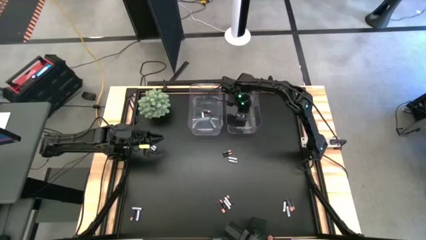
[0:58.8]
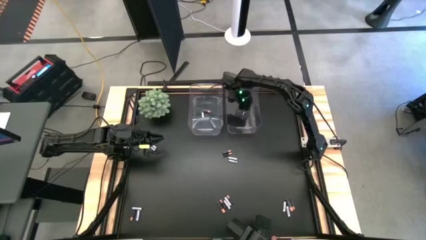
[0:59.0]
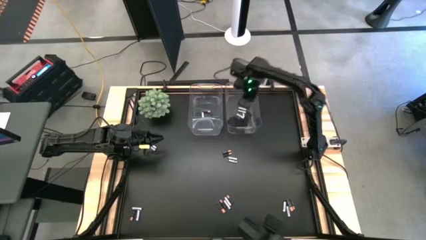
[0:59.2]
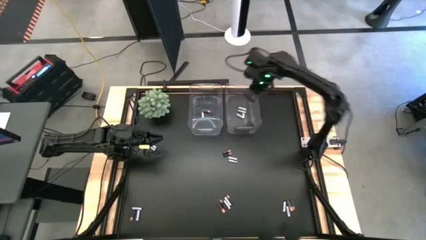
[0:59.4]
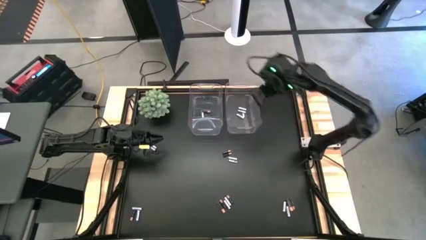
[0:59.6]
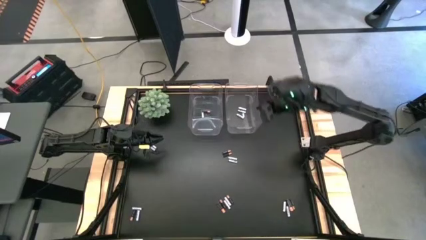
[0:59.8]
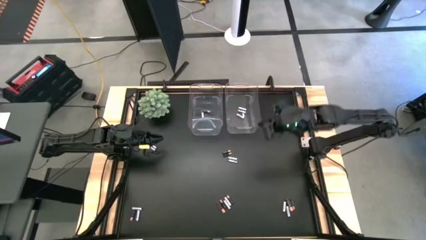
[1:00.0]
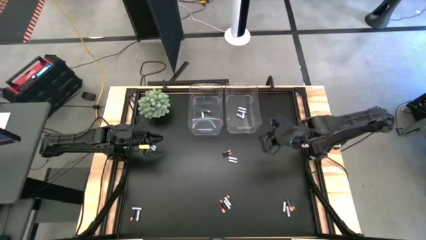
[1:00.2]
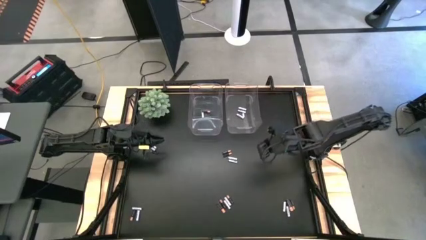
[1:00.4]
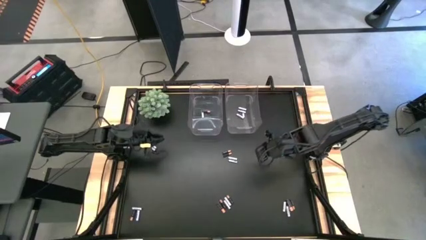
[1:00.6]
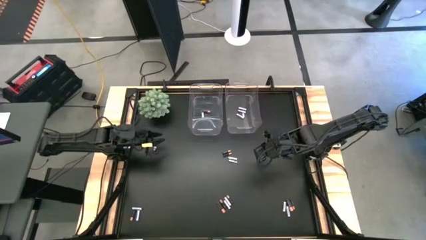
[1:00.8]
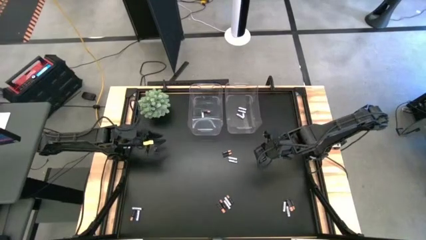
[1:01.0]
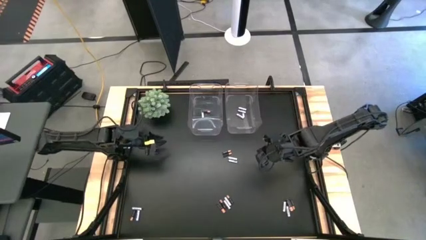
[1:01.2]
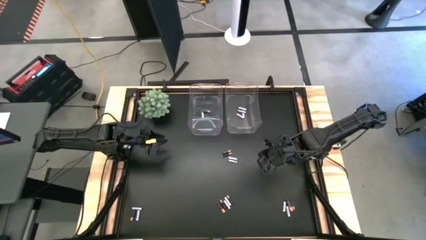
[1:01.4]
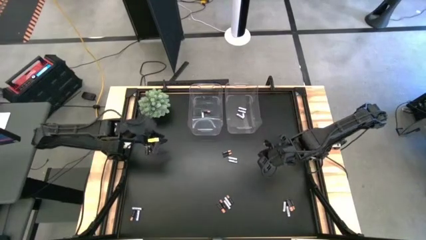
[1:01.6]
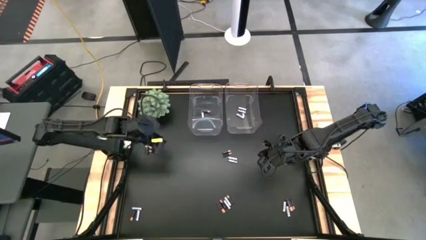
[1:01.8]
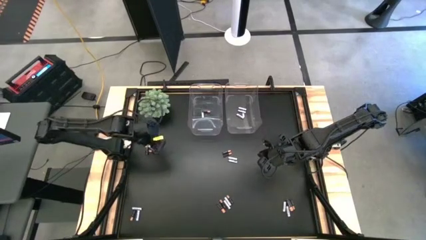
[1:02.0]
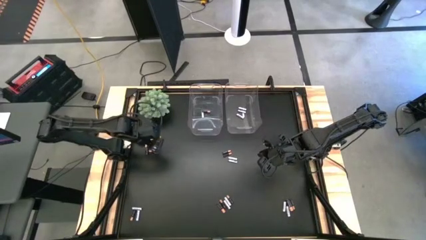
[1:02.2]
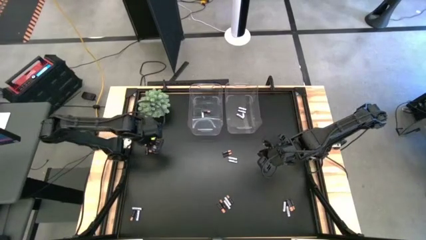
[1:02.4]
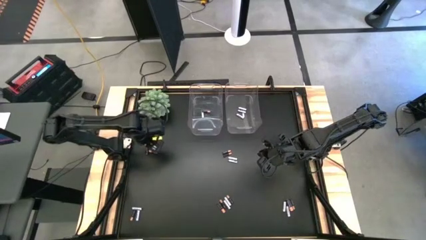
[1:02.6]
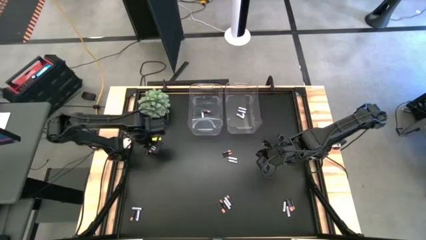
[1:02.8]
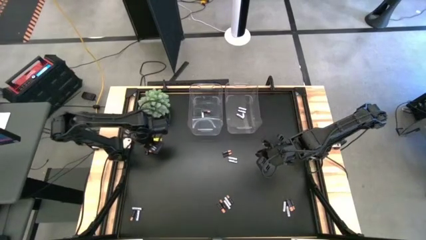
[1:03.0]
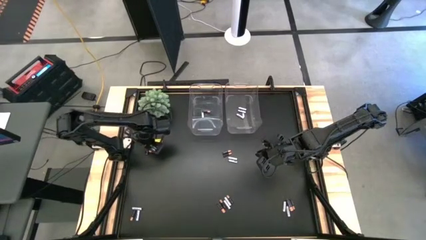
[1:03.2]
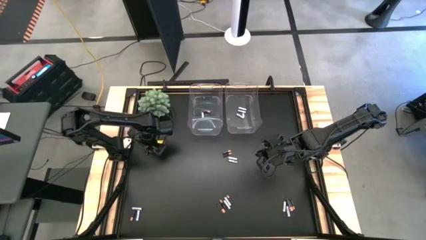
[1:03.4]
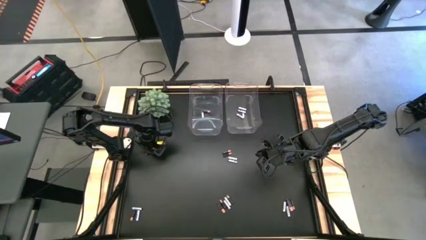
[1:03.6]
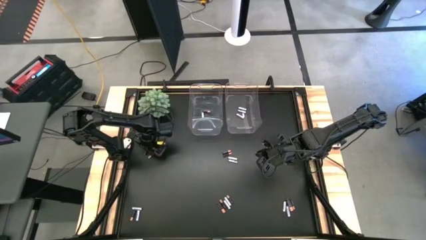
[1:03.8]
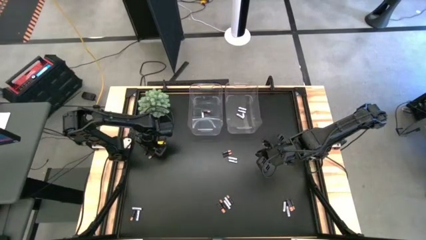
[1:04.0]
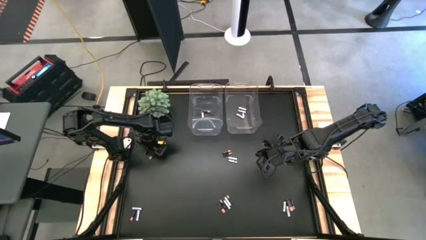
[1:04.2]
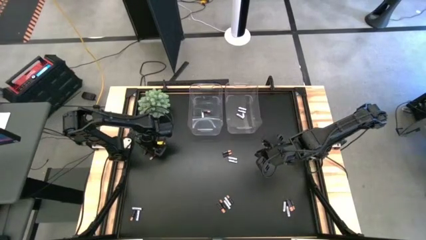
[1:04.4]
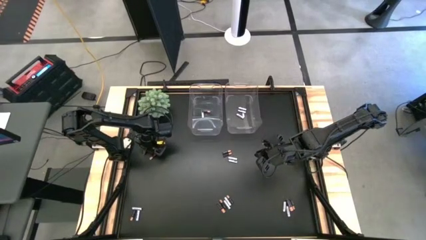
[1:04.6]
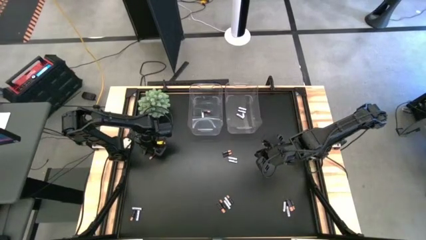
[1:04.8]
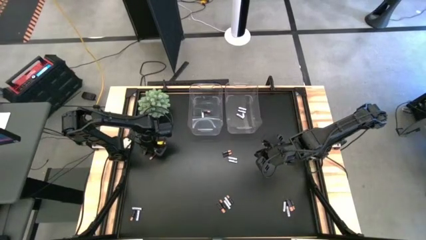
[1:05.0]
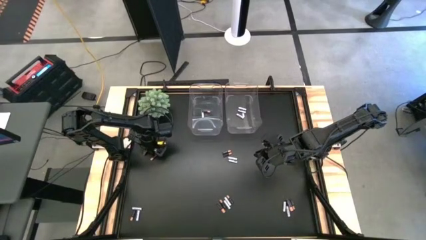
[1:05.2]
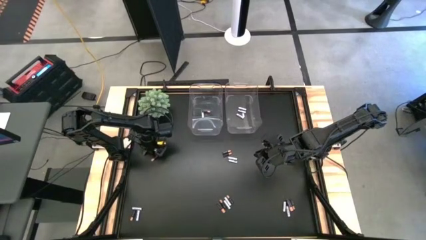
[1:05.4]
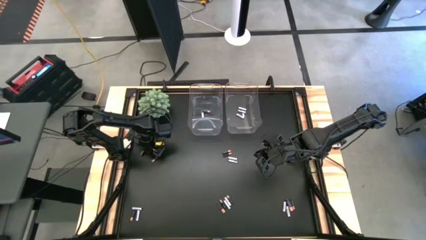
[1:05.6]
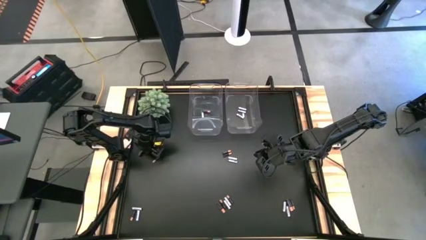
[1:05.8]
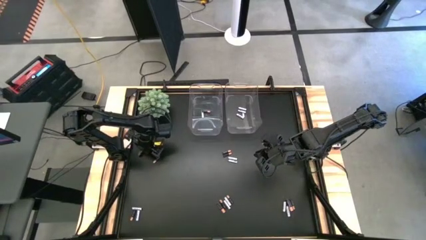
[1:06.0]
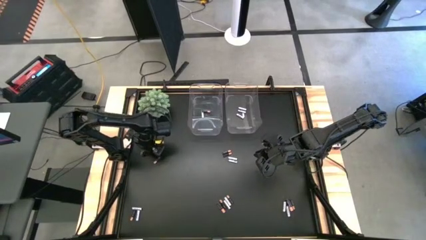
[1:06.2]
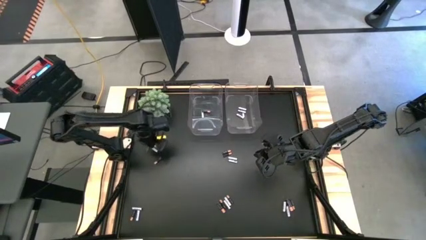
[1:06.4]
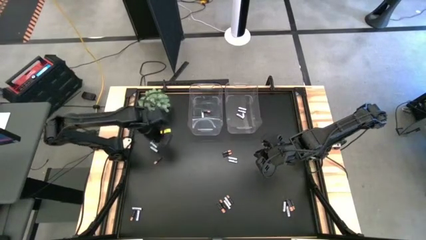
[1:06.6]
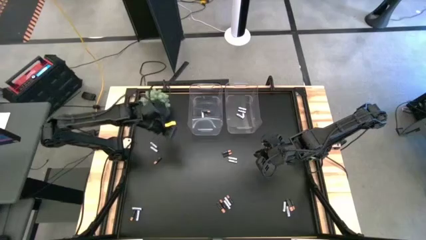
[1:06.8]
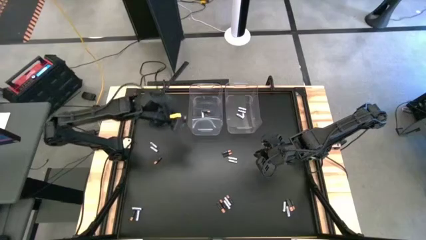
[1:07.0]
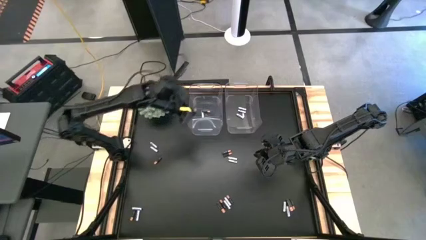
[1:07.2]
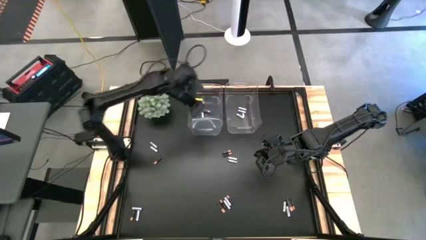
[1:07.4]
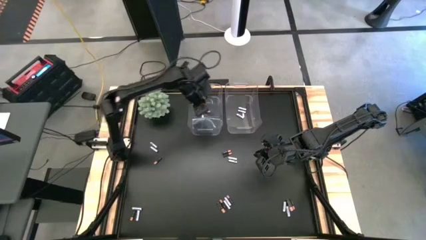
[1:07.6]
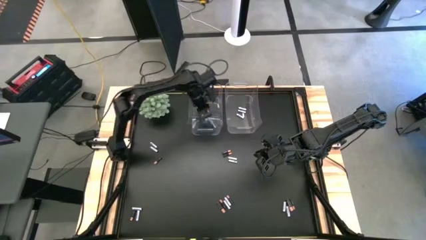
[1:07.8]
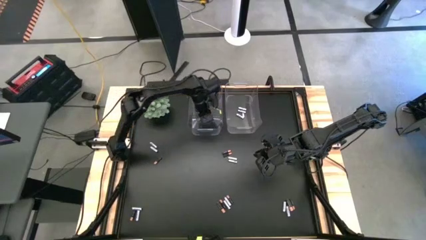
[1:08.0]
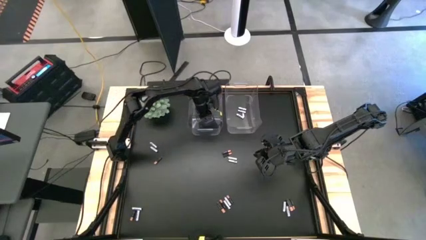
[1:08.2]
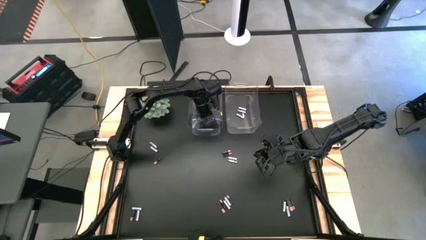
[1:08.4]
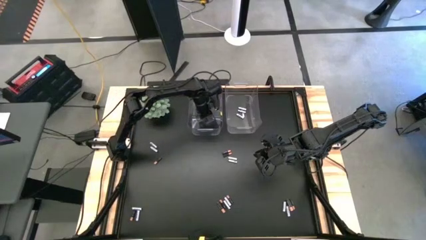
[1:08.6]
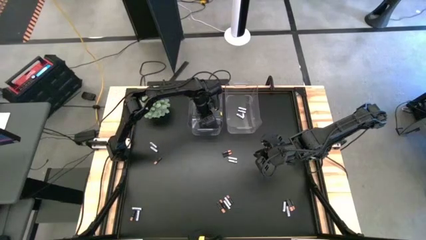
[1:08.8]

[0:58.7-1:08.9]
Task: Sort batteries
Put the large black battery into the left transparent bin

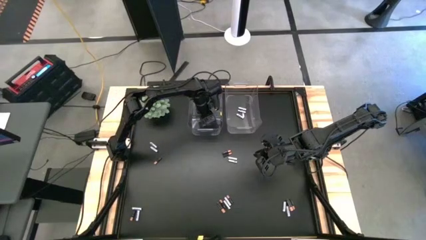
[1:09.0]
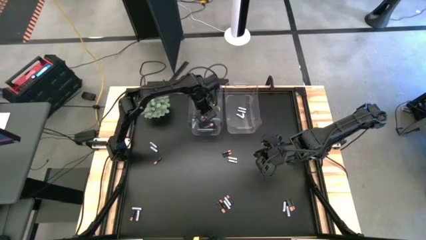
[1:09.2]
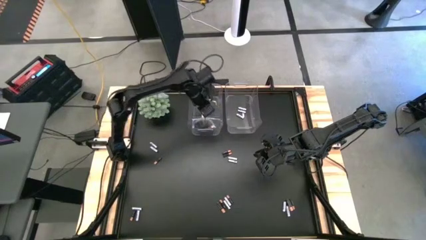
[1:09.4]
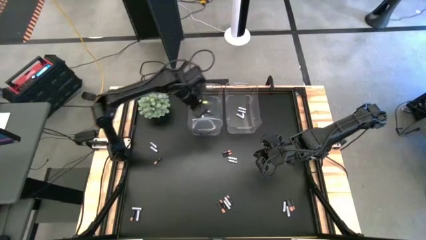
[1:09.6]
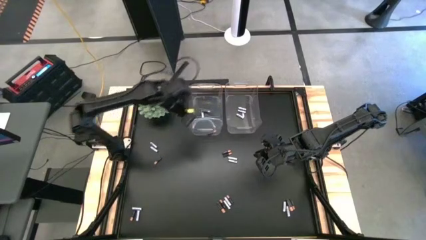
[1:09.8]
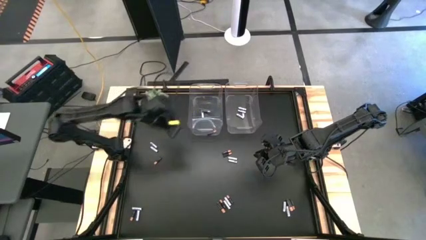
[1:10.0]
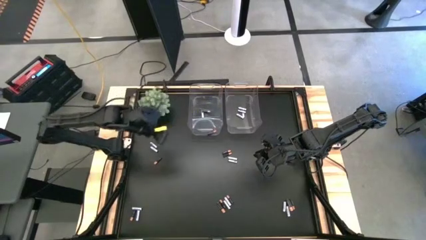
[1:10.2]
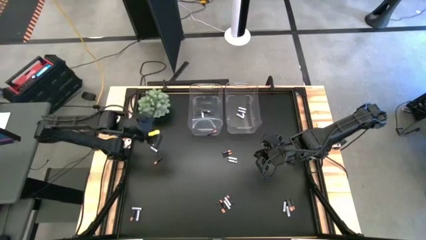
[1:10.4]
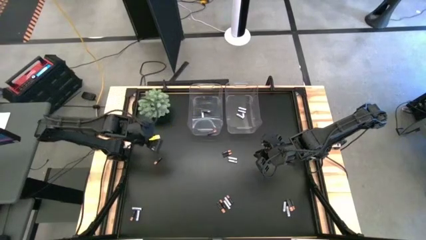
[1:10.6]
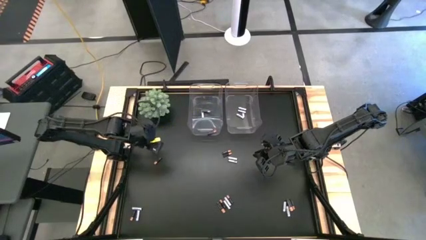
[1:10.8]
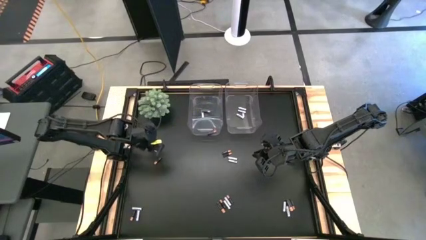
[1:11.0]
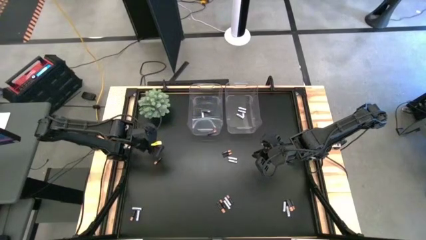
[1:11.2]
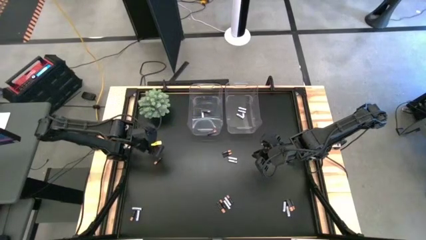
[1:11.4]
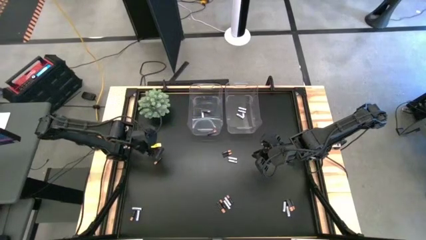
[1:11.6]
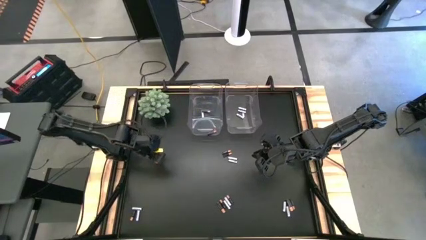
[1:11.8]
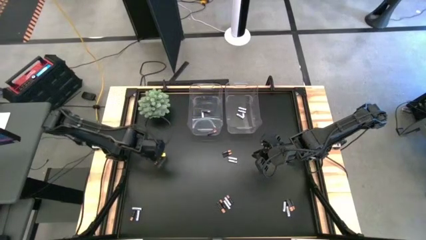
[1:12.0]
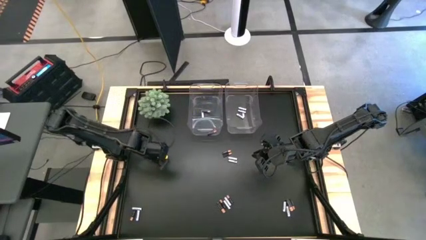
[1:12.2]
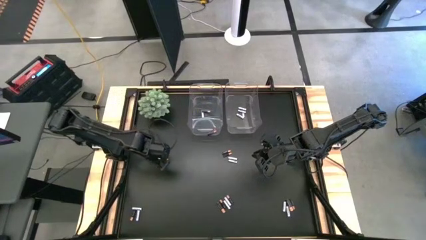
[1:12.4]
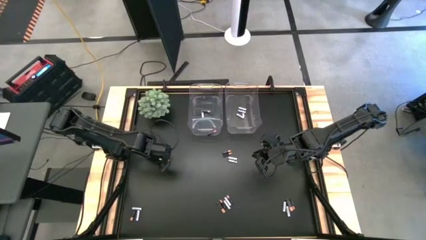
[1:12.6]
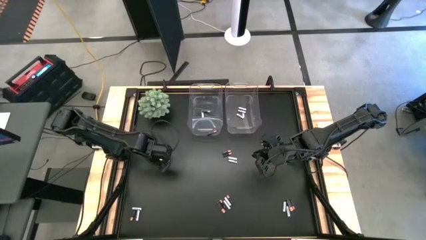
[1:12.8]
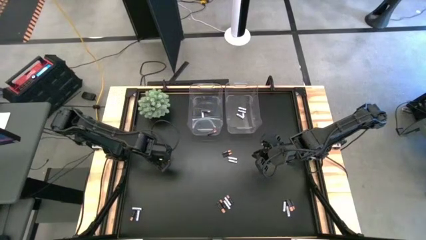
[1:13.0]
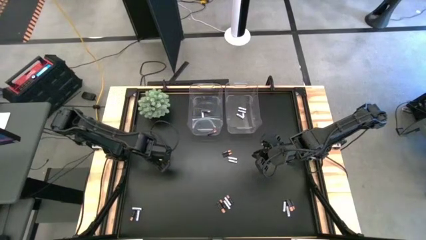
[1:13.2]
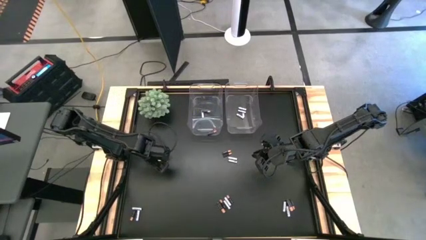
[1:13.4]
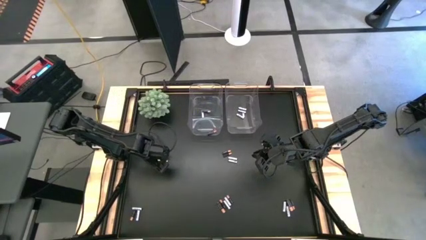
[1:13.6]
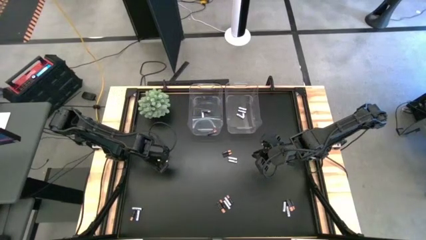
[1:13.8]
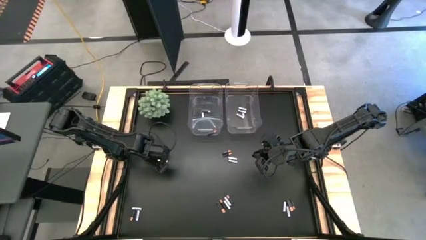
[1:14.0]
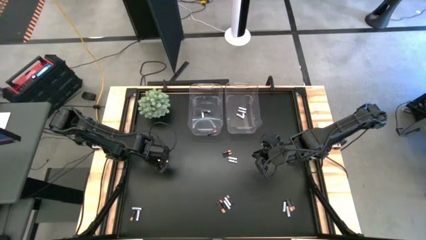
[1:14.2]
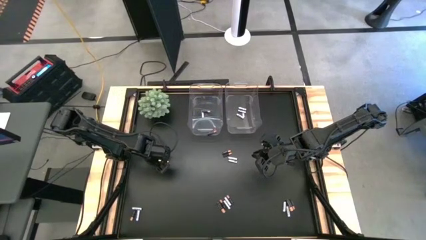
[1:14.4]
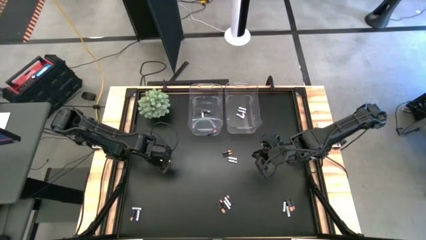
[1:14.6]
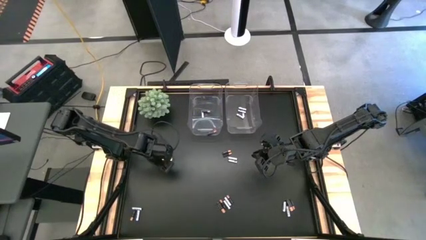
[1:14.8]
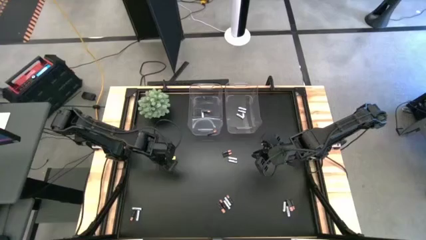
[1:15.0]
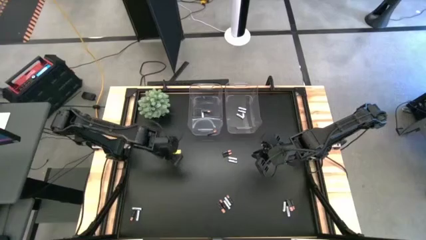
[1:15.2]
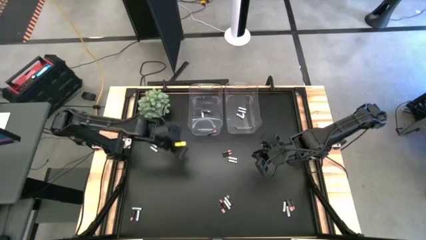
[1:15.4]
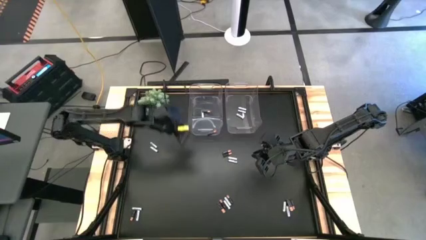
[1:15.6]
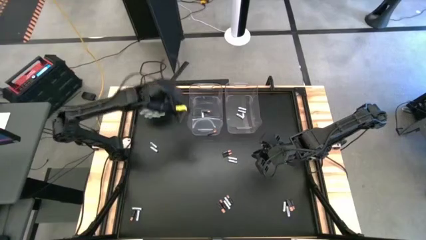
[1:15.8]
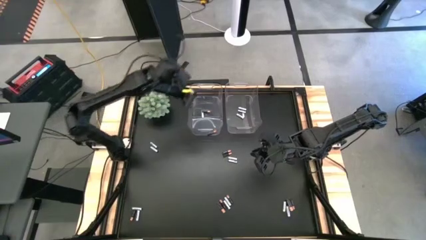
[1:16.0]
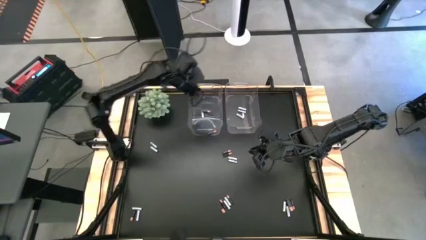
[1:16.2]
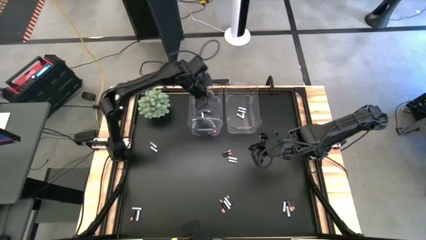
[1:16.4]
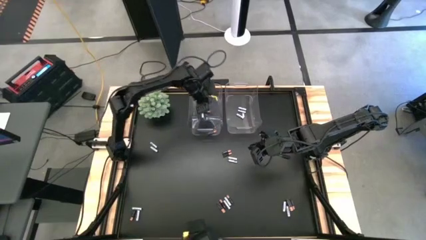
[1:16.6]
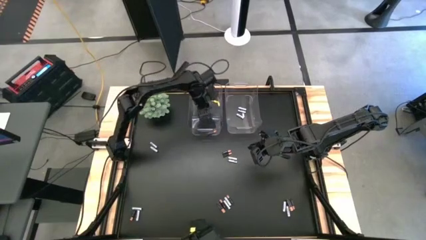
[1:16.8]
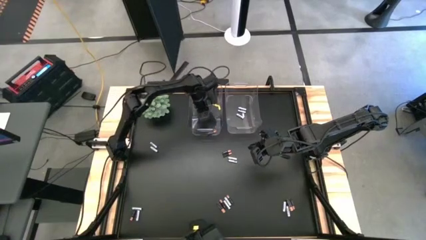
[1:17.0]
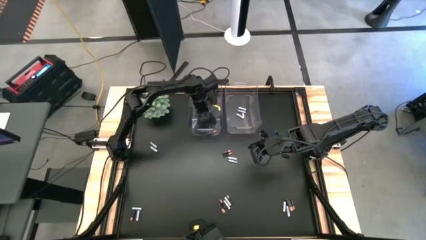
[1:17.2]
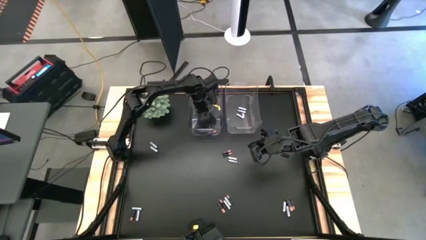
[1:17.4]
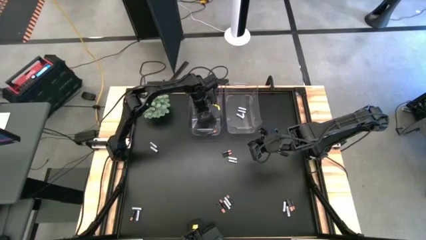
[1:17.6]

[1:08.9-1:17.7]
Put the small black battery into the left transparent bin
